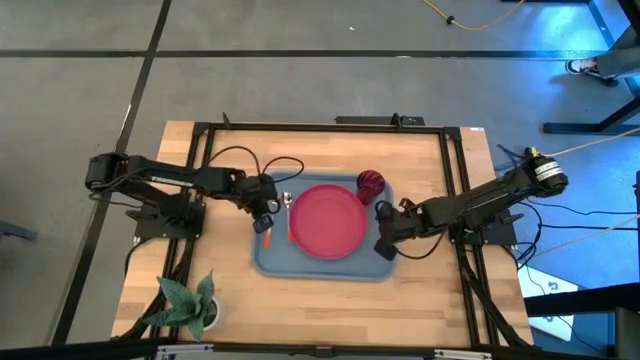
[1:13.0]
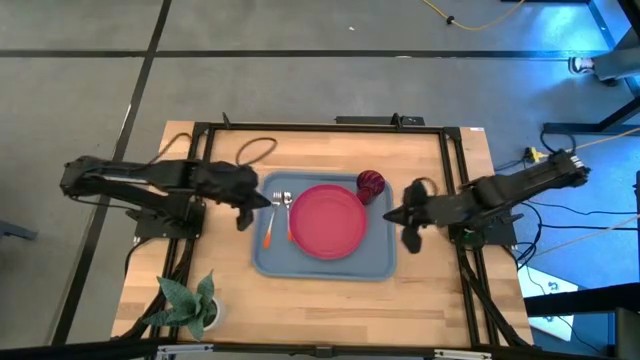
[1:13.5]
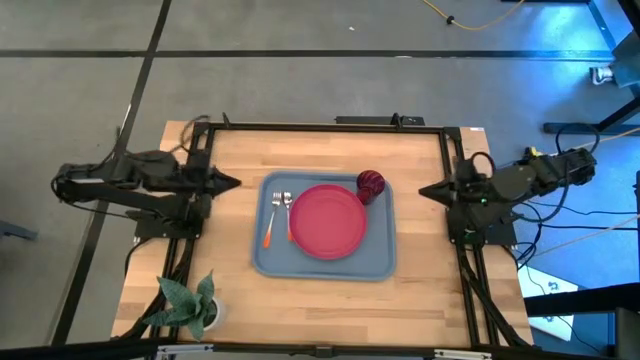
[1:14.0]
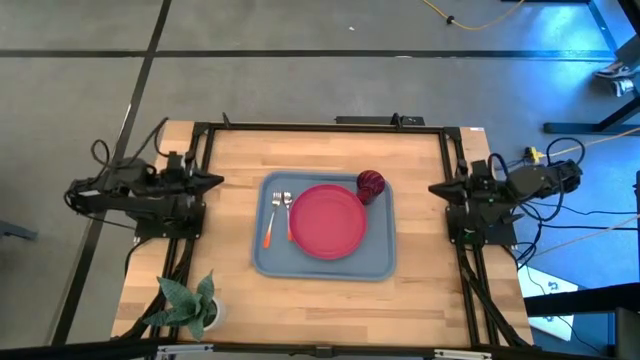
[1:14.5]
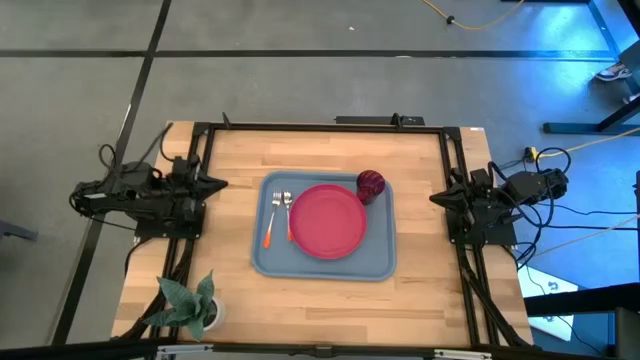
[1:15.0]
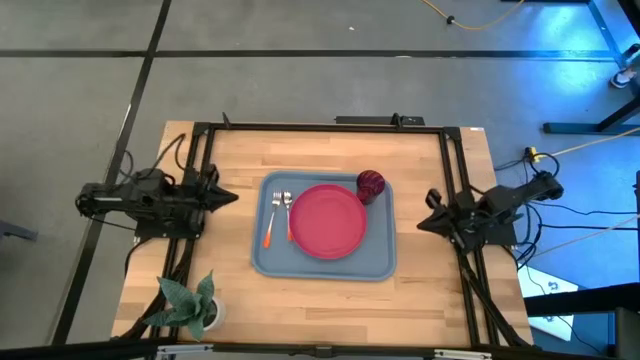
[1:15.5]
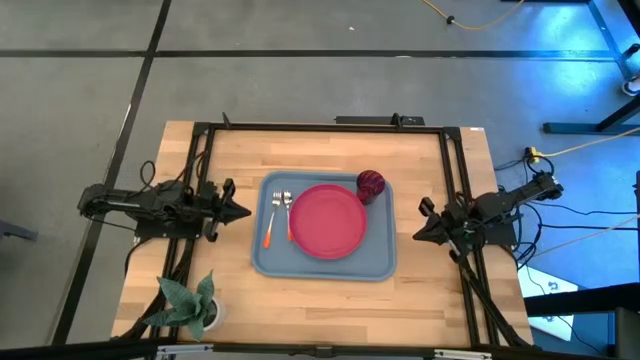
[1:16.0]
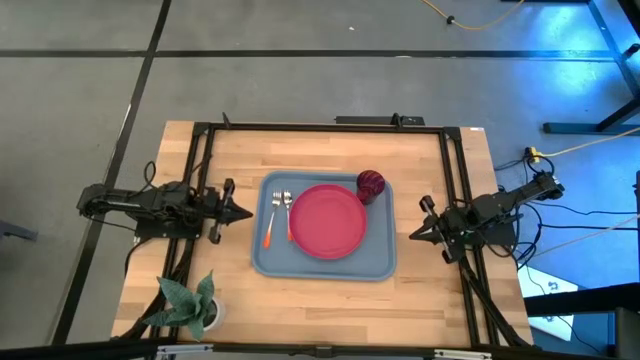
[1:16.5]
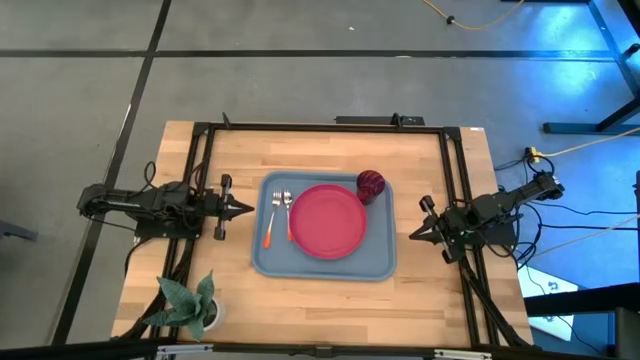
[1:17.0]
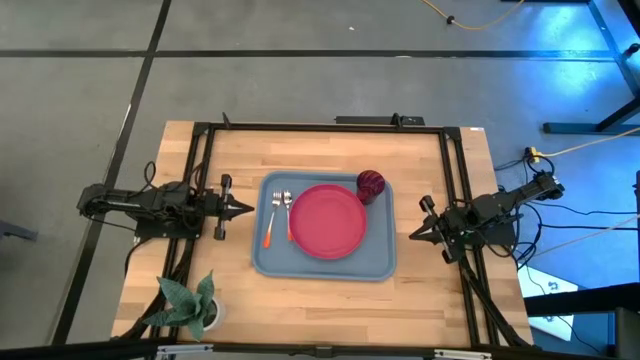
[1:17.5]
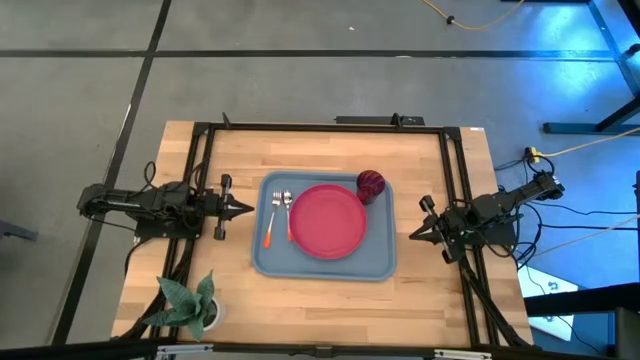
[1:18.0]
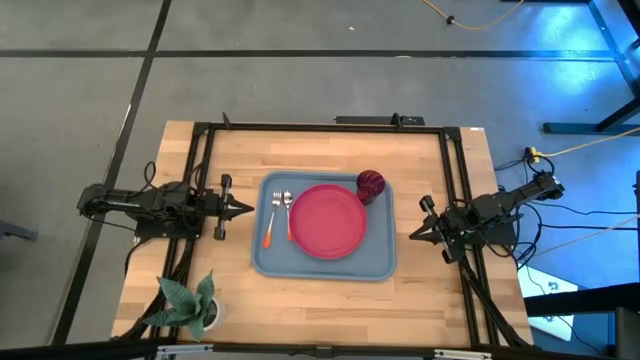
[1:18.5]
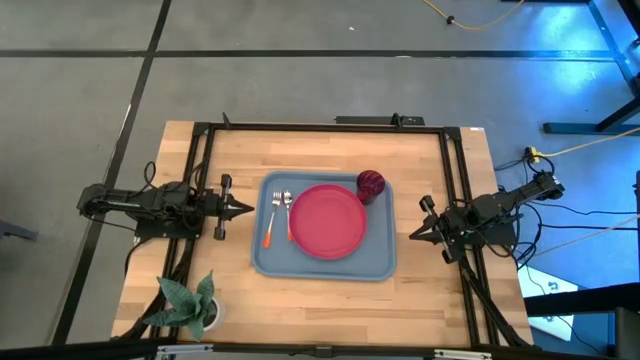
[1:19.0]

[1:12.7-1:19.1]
Task: Pick and place plate/cup/fork/spoon on tray
Return to Home Position

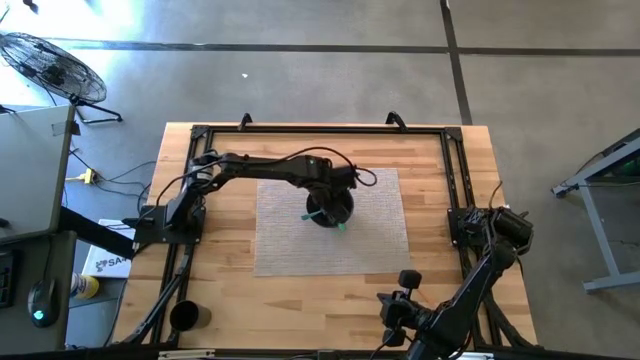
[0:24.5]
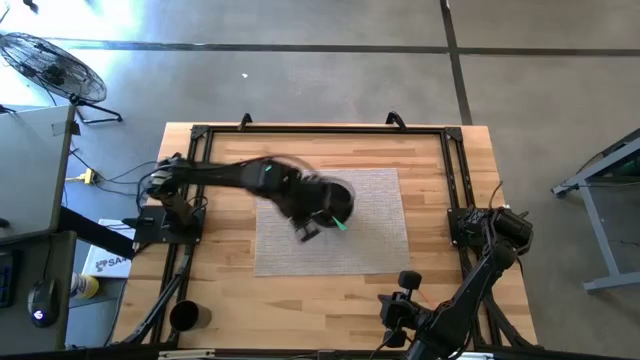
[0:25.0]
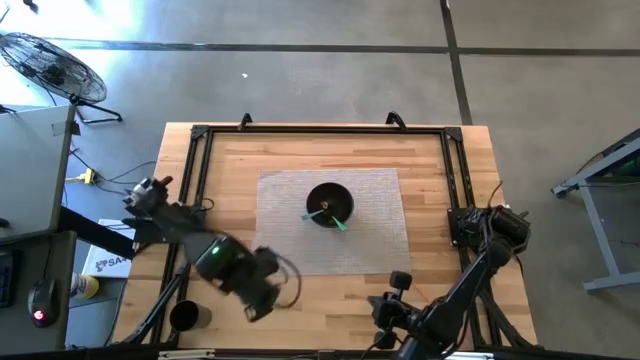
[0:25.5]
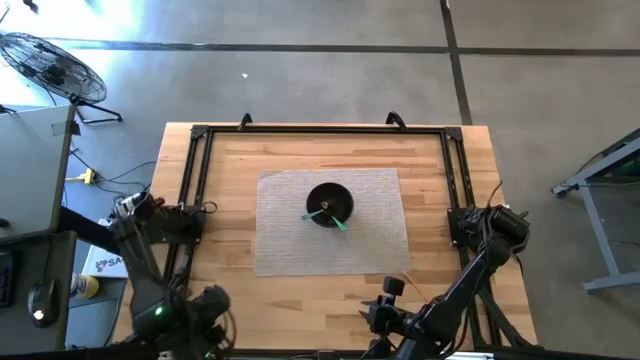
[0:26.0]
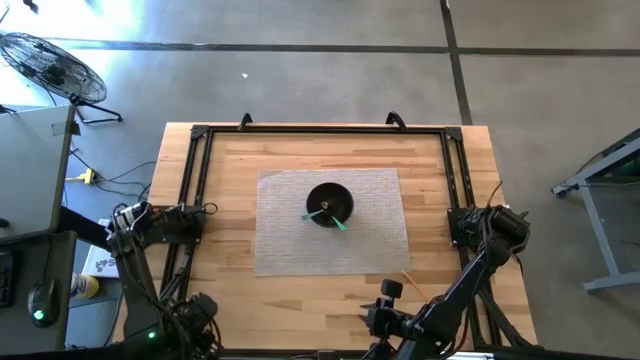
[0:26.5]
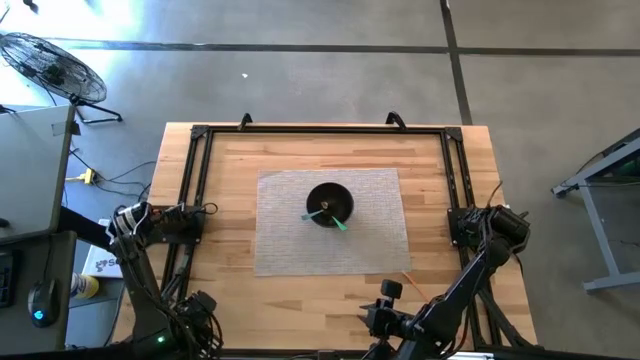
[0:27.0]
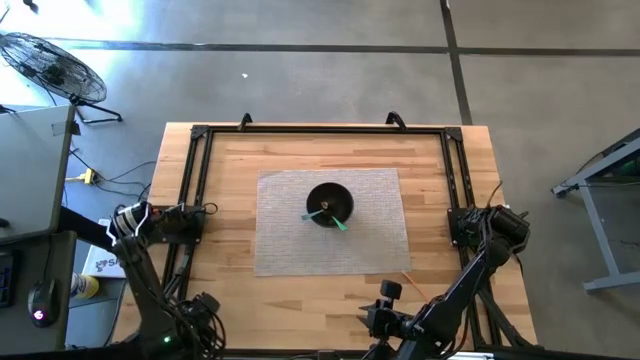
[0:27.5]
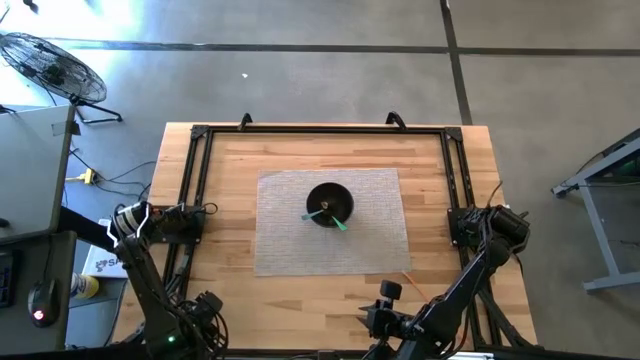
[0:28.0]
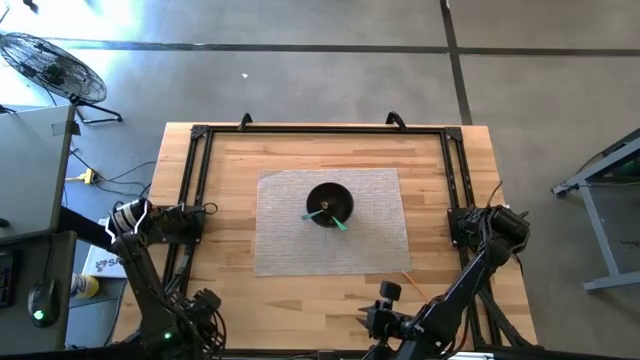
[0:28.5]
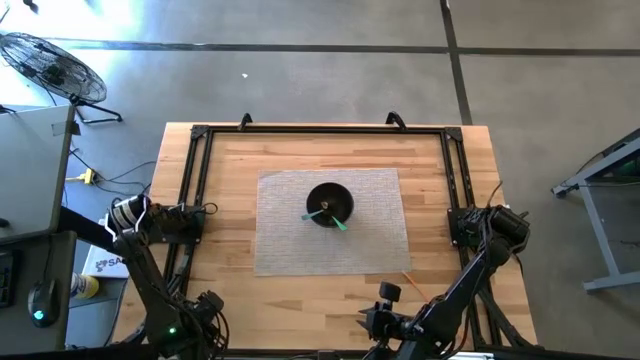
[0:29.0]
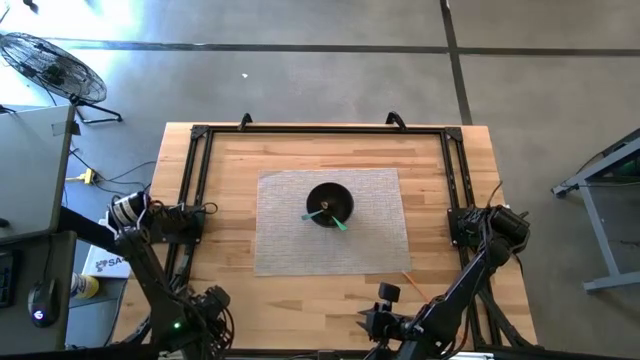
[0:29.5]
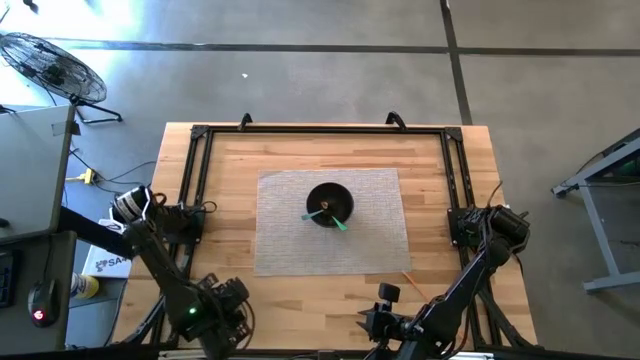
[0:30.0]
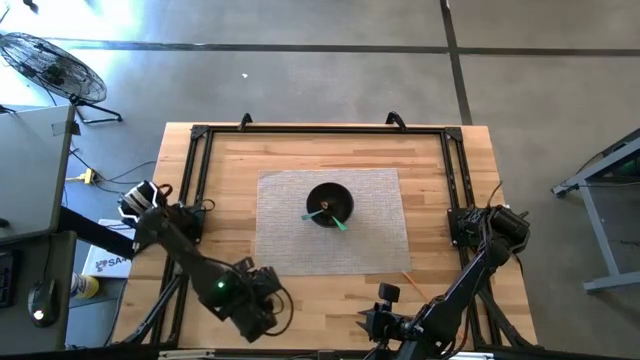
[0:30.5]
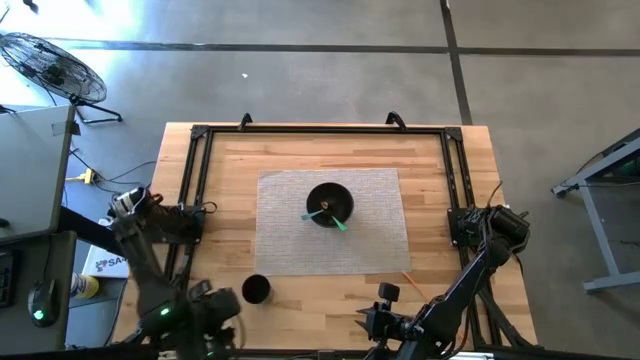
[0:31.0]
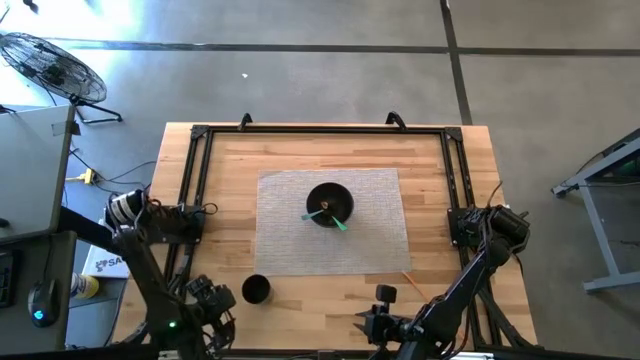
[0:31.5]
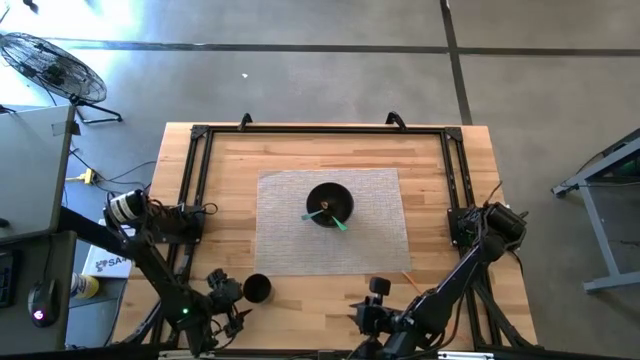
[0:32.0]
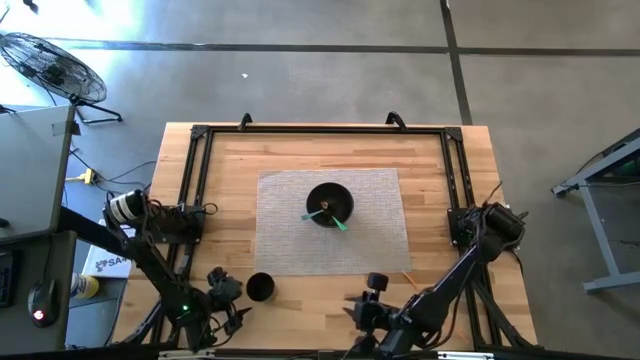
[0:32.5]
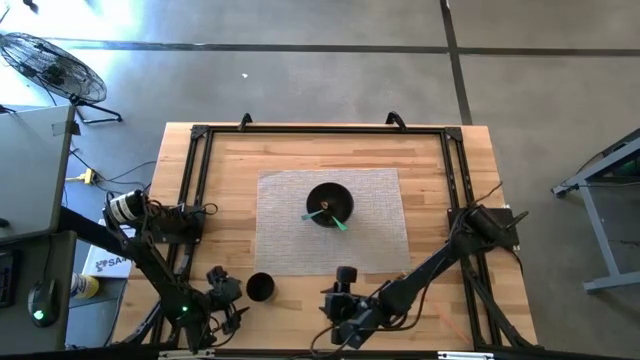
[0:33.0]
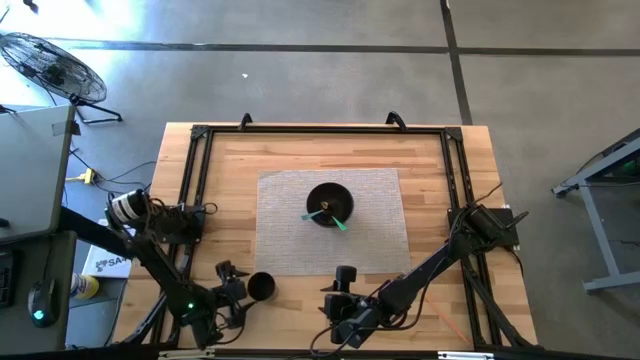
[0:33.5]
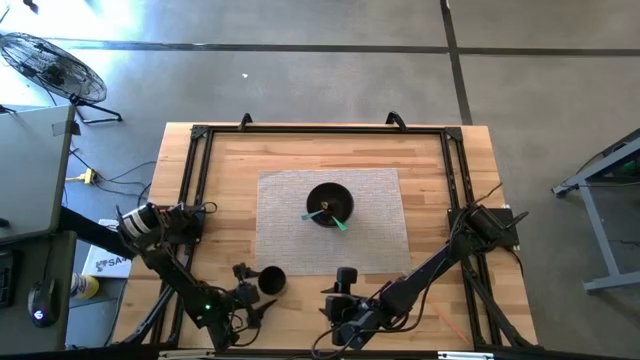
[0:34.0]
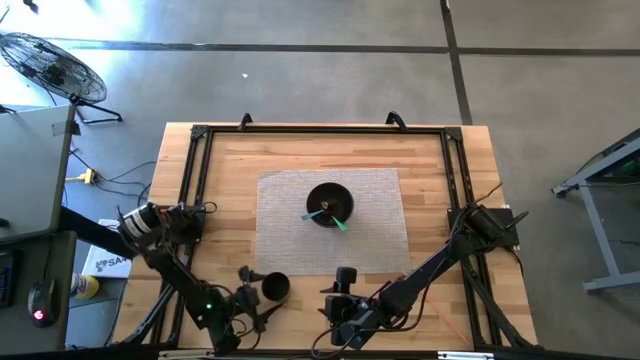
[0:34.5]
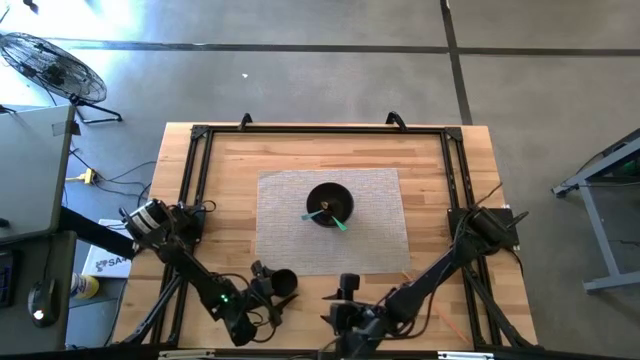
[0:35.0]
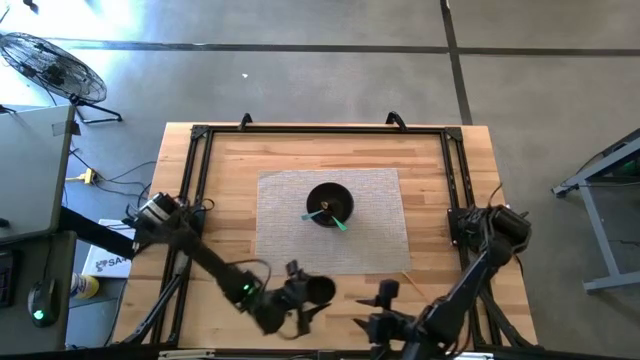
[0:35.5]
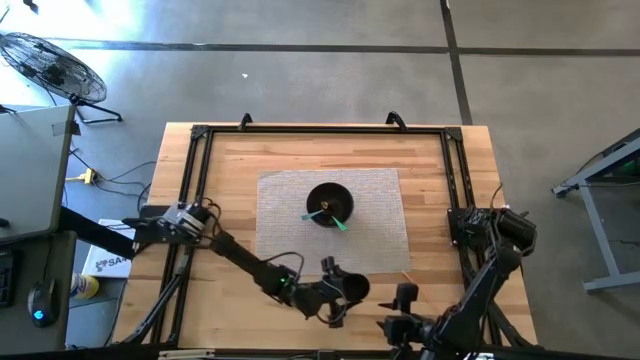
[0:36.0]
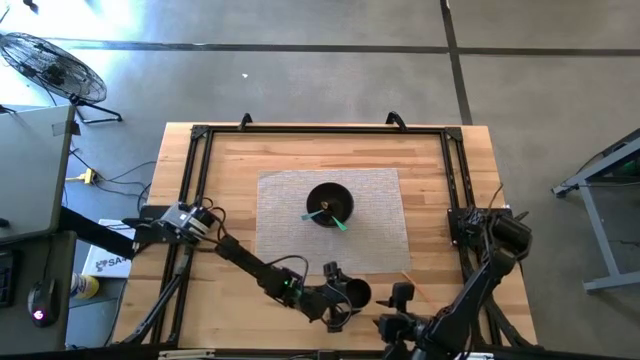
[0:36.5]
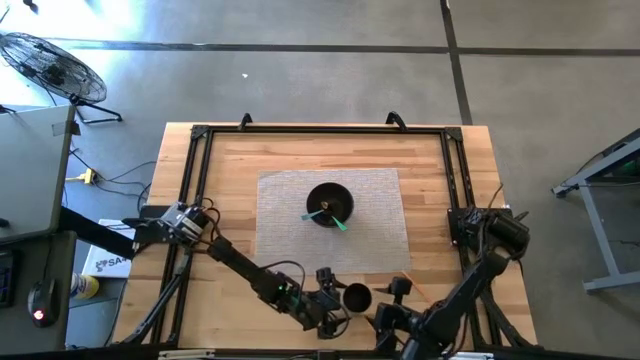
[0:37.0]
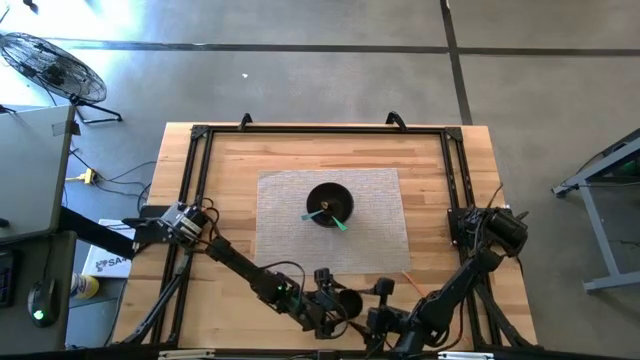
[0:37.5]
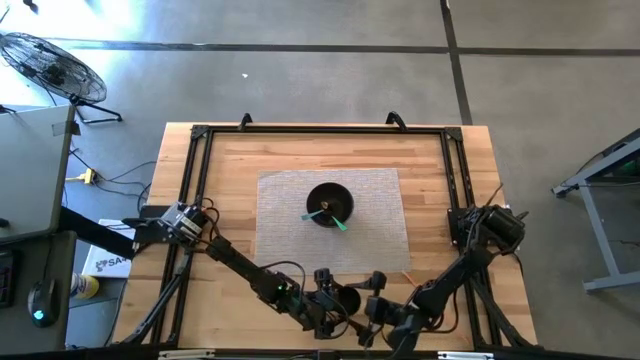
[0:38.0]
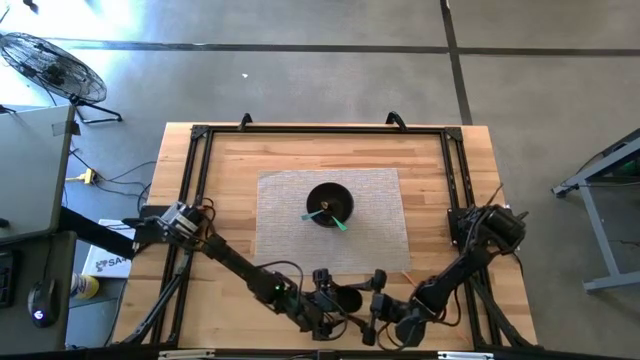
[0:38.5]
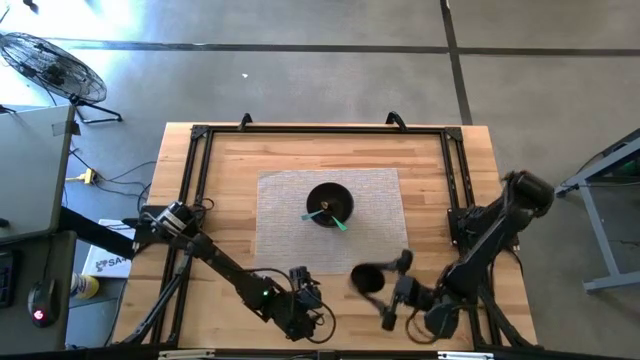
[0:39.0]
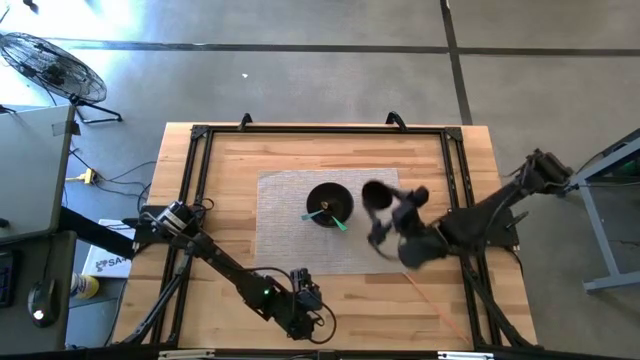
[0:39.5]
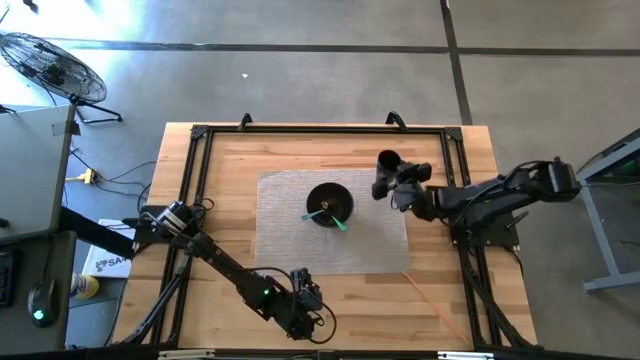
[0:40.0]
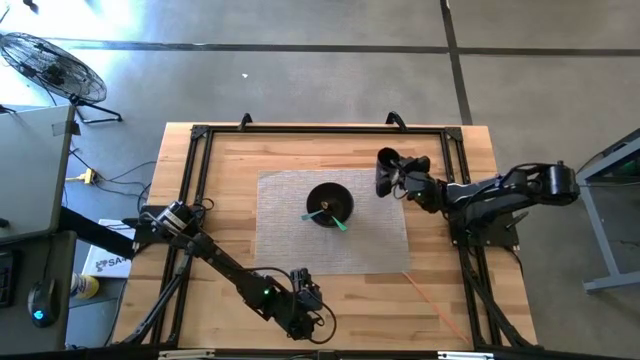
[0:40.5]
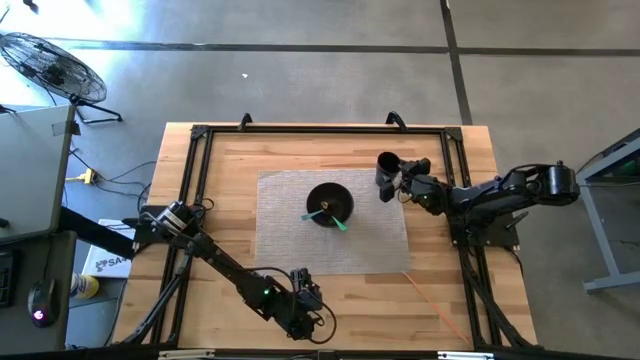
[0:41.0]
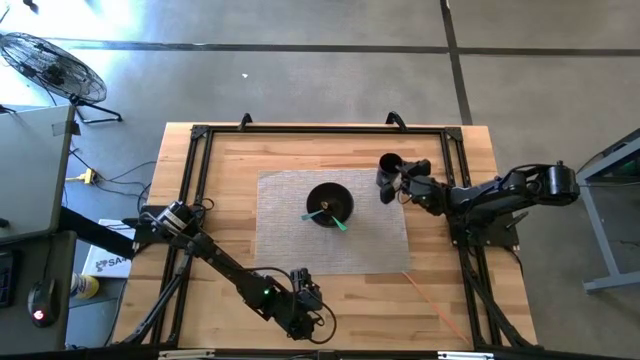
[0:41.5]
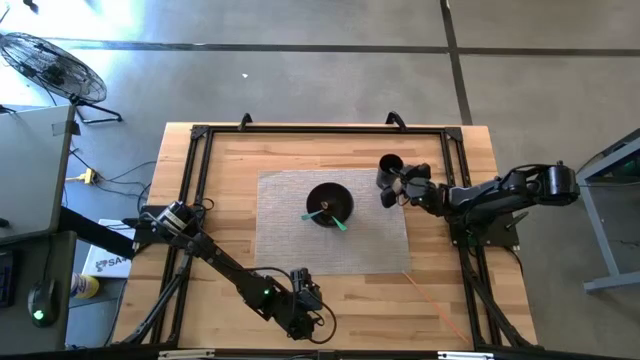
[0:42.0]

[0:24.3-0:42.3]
Task: Pick & Place Utensil
Put the black cup on the table mat
